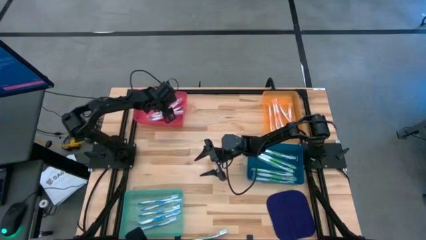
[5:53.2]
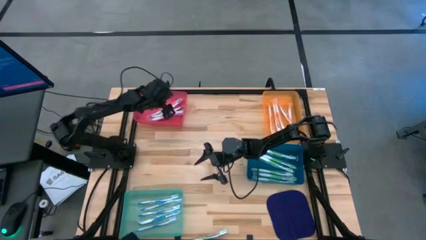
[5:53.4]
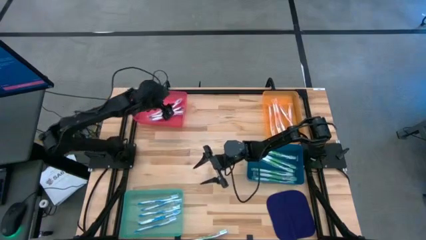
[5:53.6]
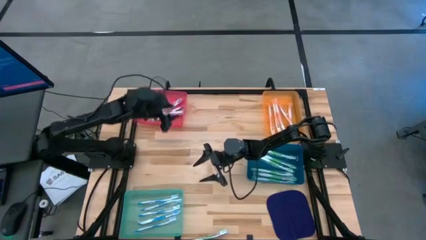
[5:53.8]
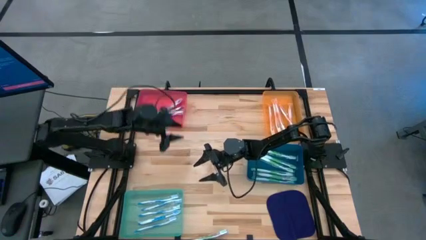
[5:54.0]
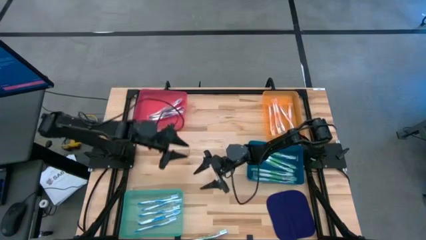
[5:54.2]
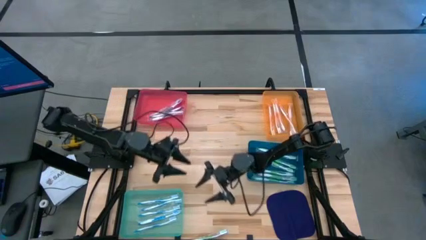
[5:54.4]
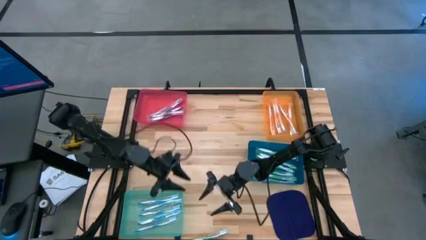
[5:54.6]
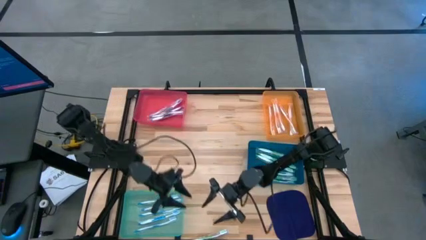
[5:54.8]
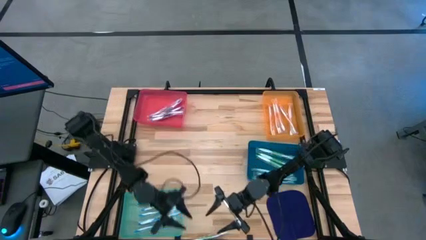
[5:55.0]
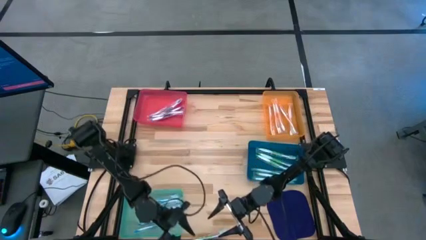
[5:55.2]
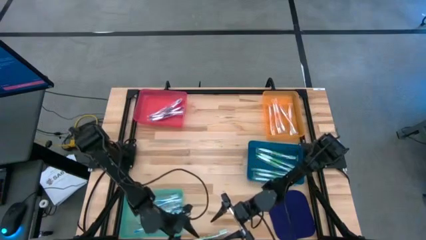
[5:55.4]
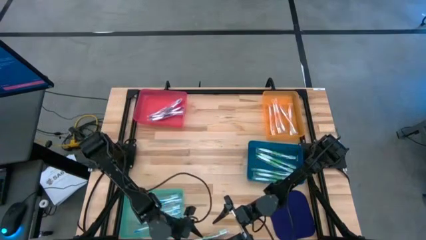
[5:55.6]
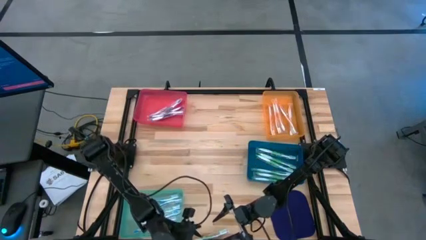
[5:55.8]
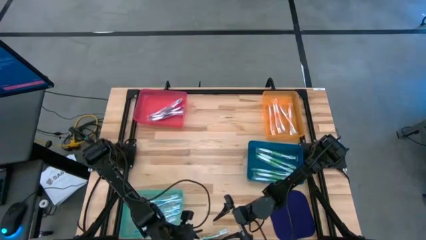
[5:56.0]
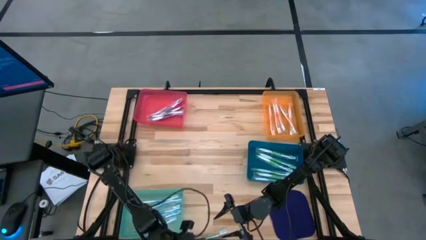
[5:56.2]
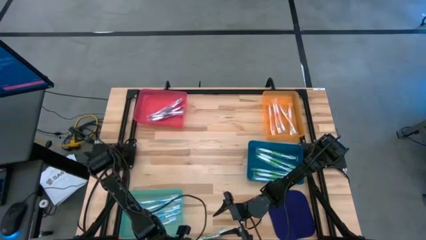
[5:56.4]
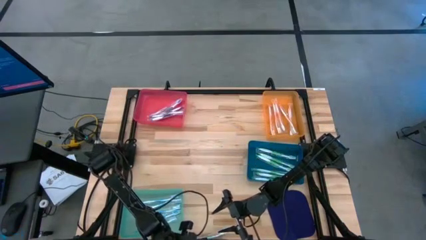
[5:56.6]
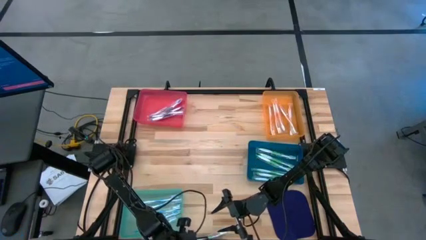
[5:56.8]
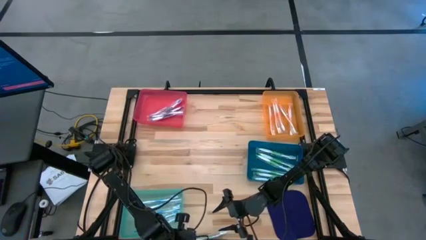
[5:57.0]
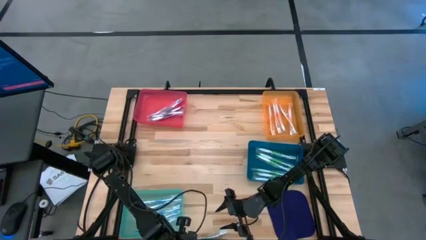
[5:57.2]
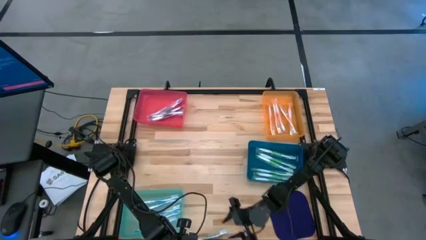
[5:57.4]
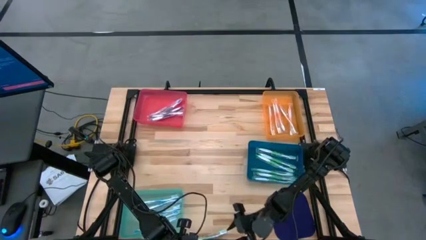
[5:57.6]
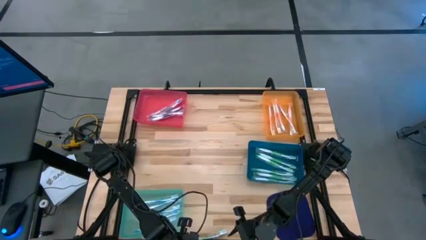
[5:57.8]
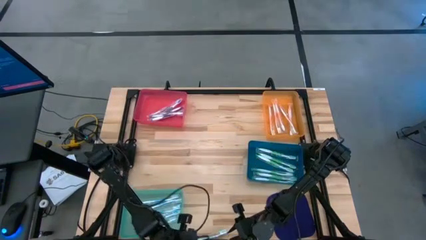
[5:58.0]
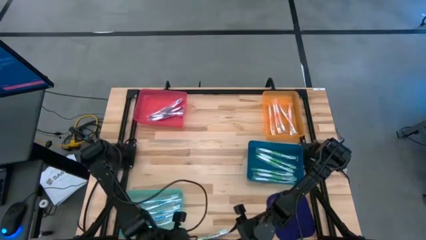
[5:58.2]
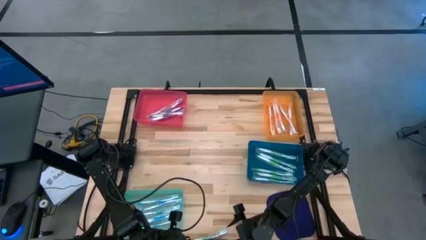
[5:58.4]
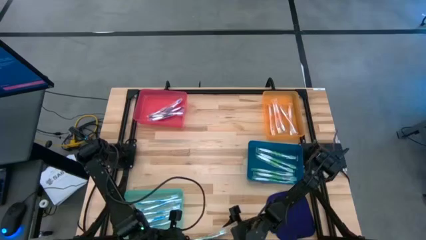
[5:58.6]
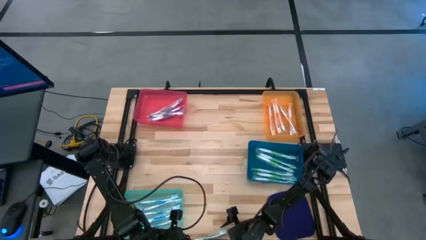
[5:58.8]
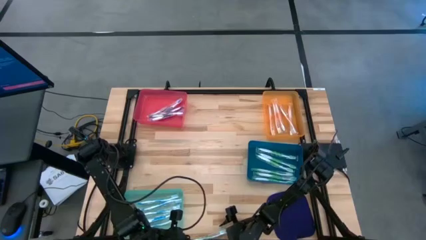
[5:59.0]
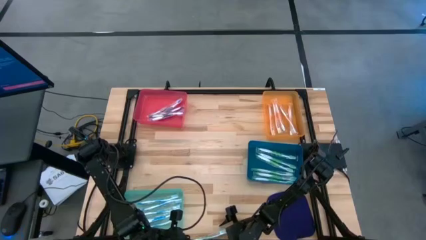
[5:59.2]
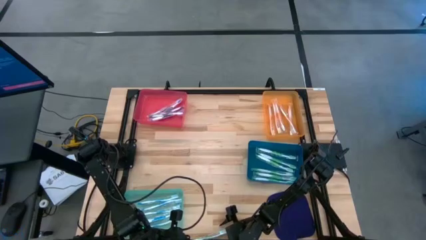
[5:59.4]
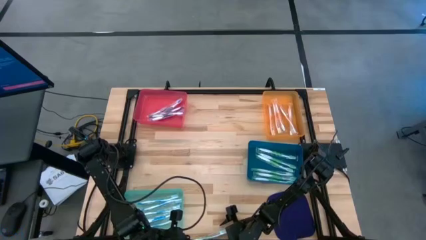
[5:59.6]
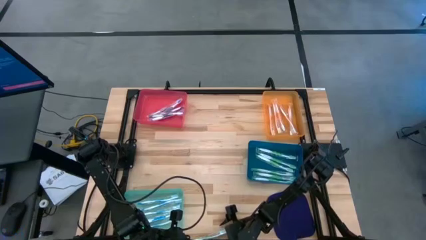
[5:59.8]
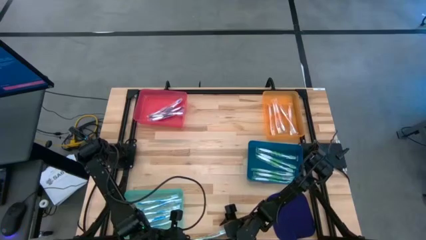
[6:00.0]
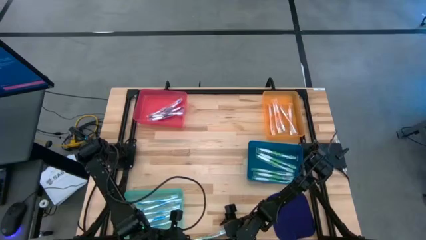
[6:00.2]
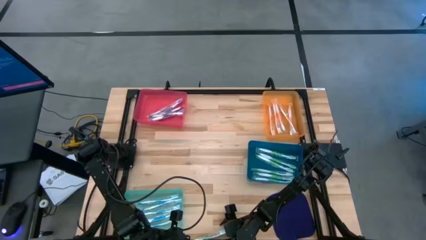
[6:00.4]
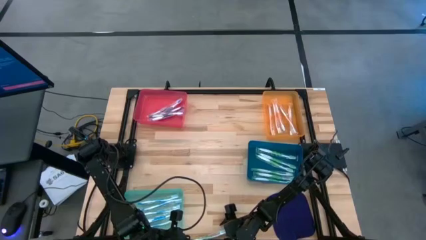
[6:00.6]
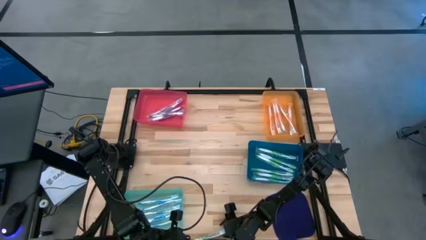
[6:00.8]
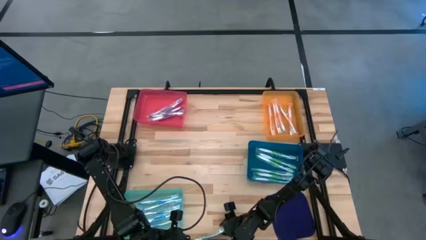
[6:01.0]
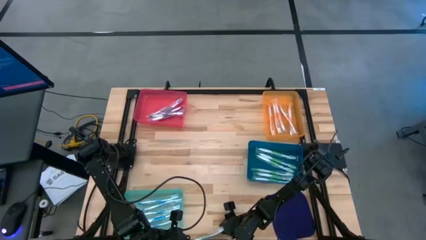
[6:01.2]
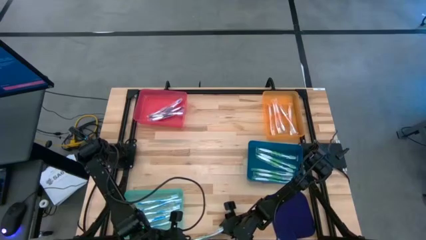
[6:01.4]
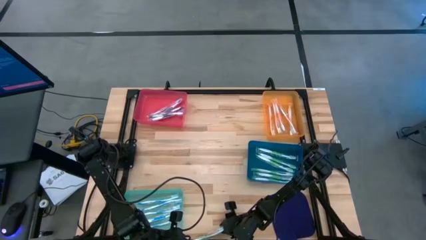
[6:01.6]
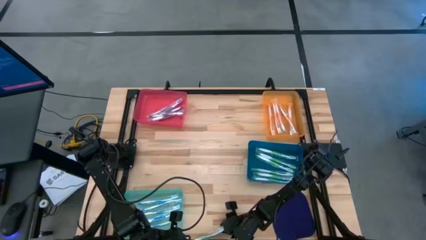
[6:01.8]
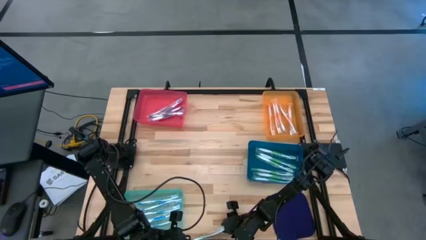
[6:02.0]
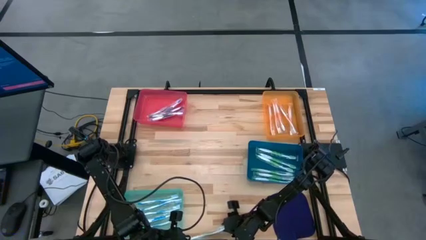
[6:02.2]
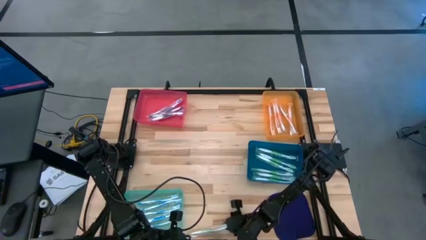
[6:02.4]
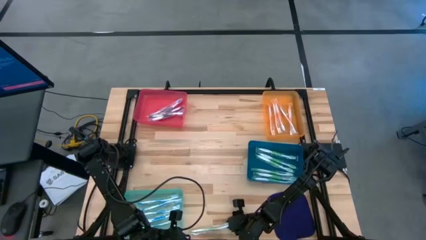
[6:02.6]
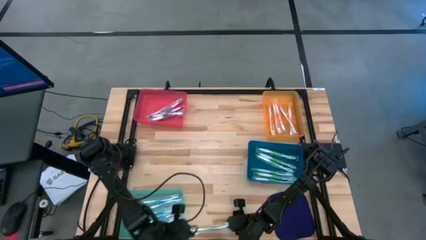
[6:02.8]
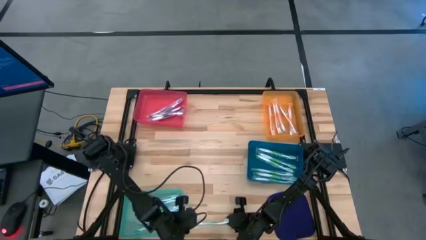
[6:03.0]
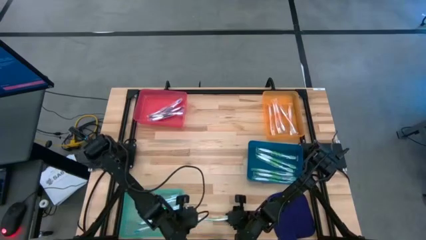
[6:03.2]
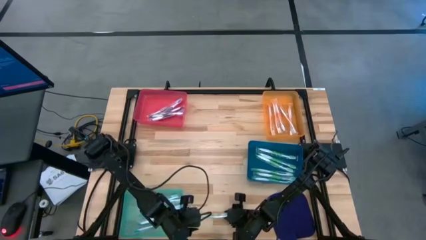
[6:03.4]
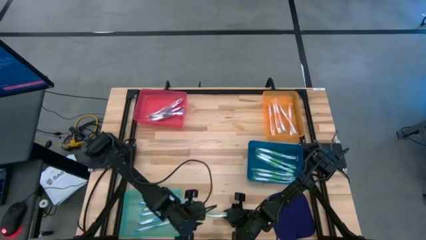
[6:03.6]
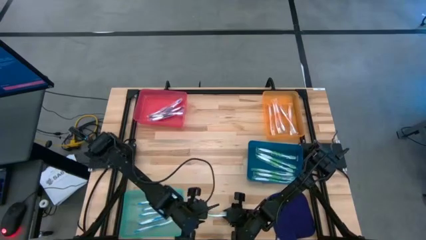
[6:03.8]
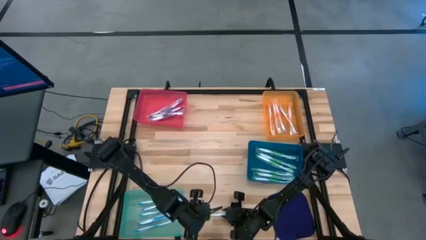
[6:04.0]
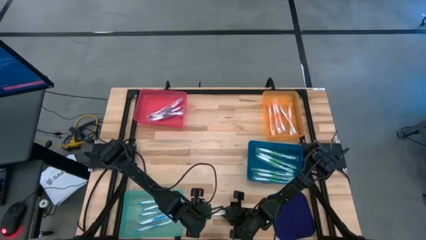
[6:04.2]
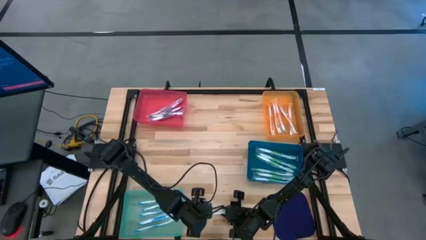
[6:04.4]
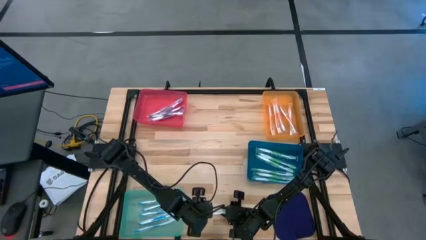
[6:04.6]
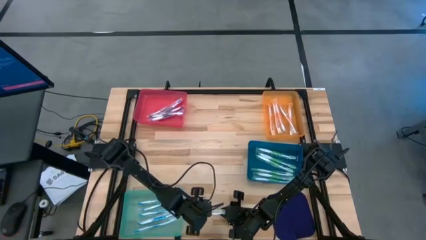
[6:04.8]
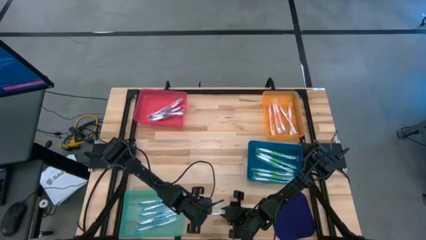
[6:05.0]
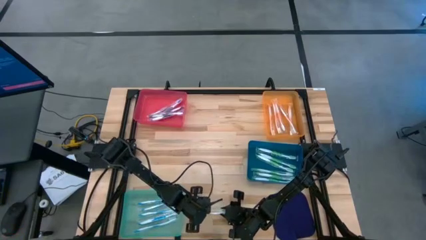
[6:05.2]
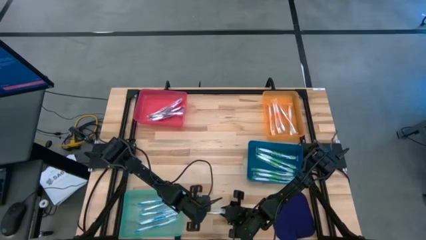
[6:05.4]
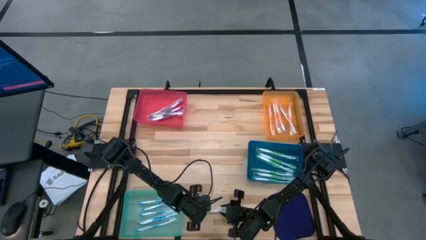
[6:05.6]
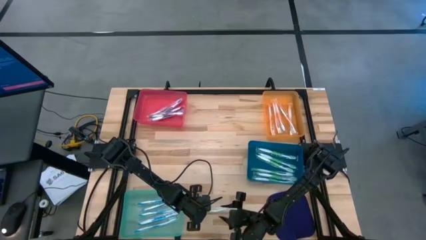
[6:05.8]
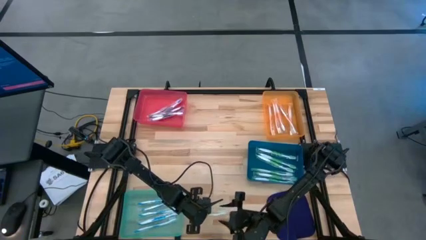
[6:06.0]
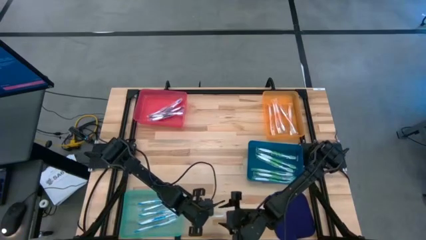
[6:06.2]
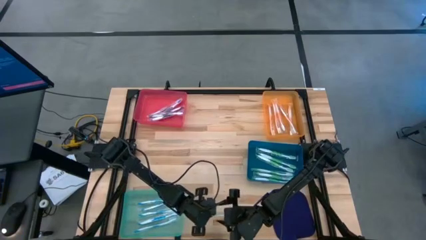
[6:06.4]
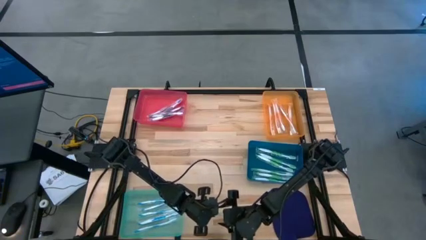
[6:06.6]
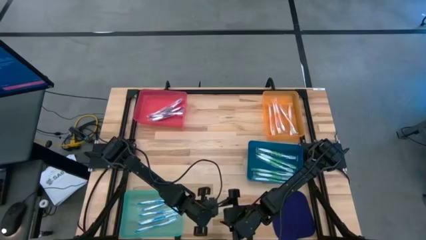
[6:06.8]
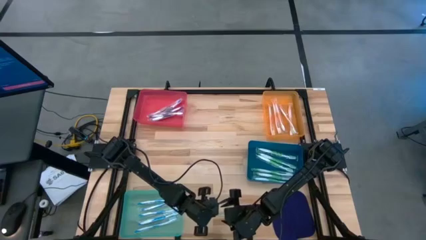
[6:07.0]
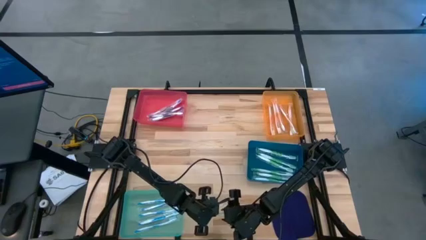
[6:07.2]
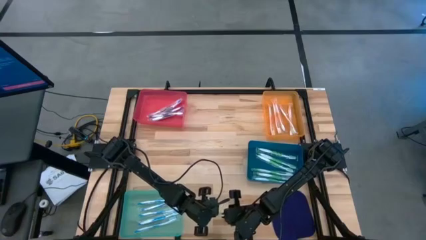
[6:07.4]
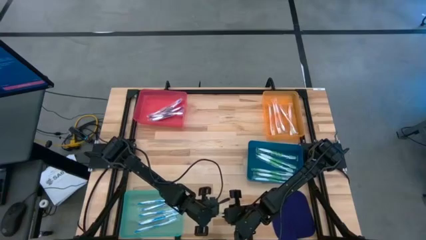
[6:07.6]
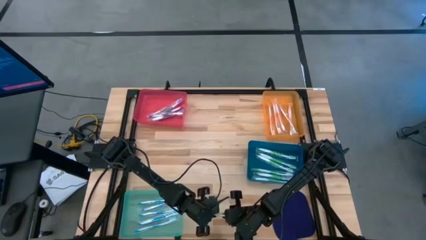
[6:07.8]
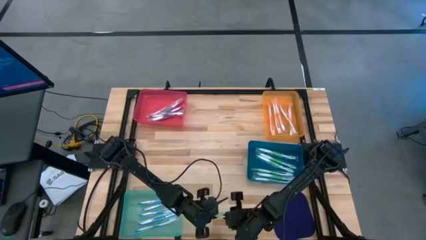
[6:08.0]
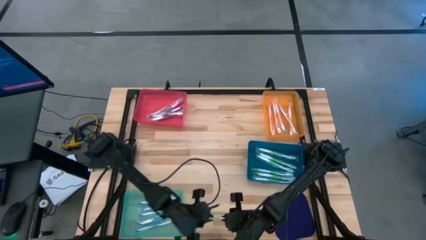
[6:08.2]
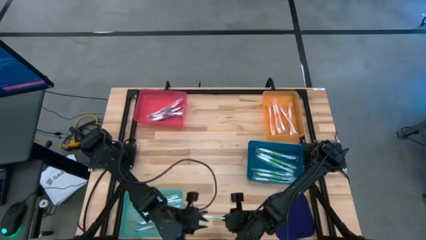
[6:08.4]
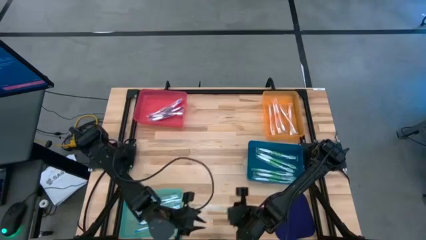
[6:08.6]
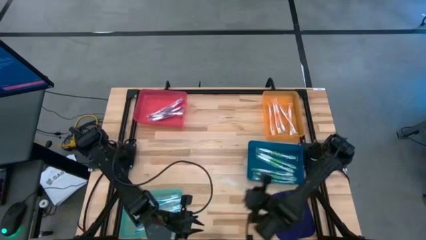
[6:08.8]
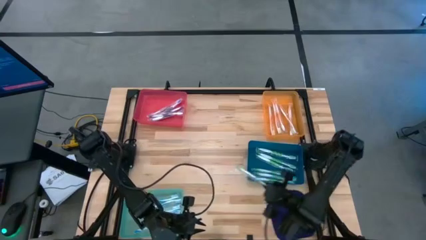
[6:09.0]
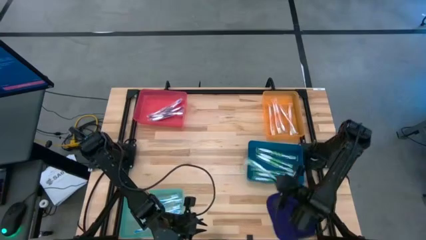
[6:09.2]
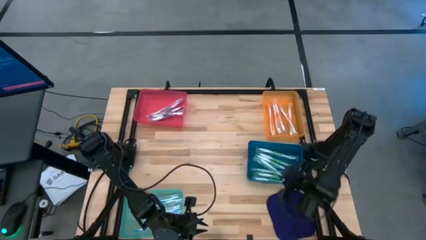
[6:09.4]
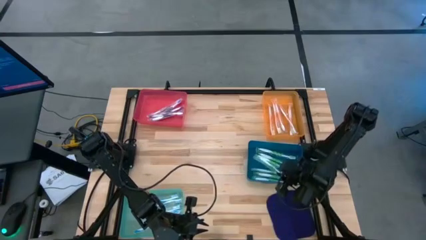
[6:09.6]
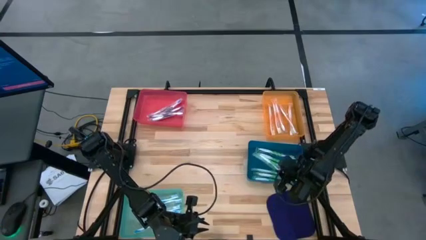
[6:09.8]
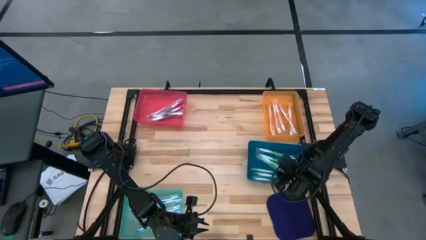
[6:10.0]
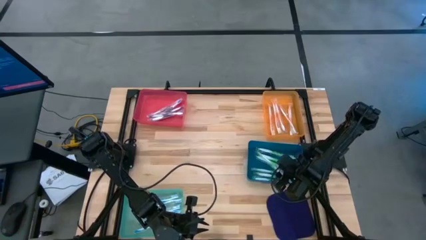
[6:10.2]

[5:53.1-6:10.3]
Task: Pick & Place Toothbrushes
Put the green toothbrush into the blue bin
